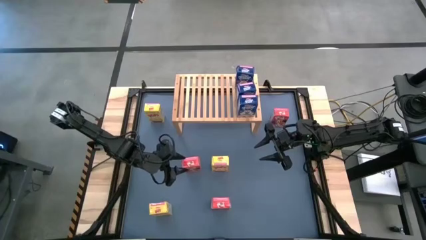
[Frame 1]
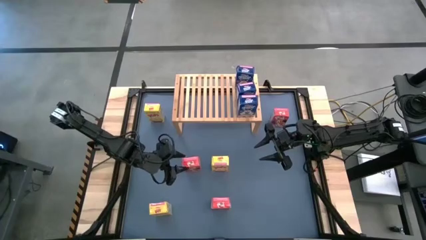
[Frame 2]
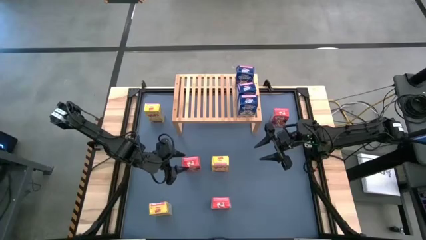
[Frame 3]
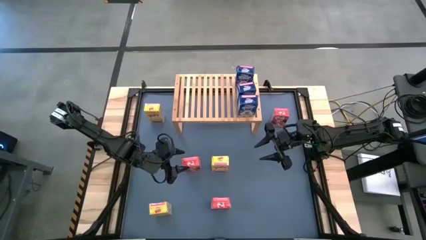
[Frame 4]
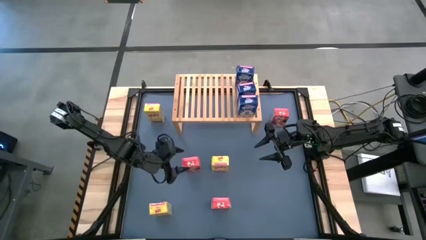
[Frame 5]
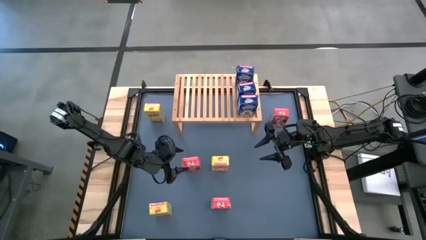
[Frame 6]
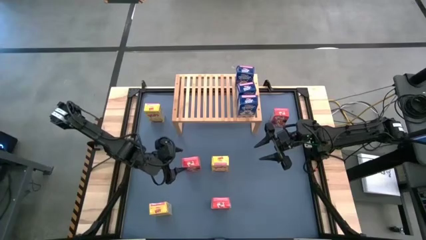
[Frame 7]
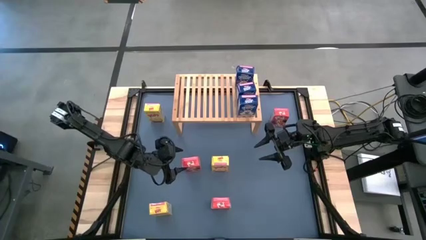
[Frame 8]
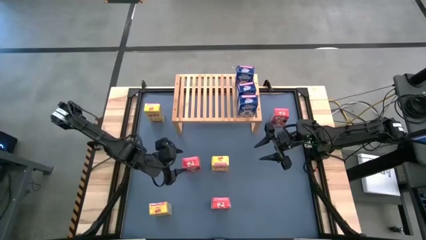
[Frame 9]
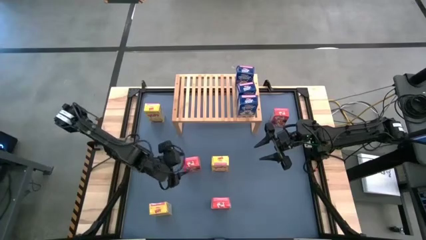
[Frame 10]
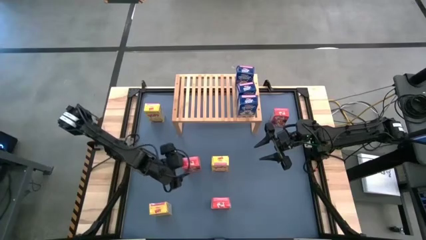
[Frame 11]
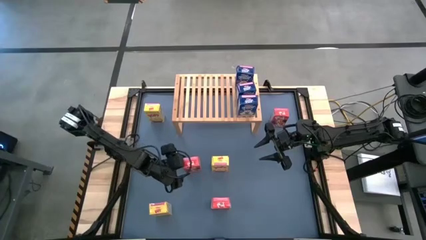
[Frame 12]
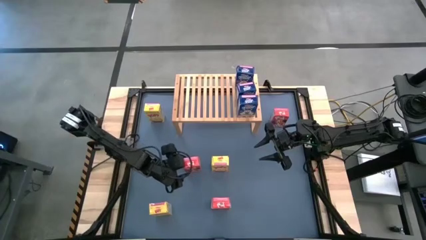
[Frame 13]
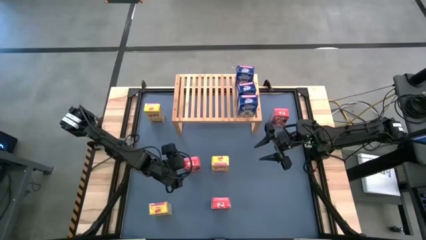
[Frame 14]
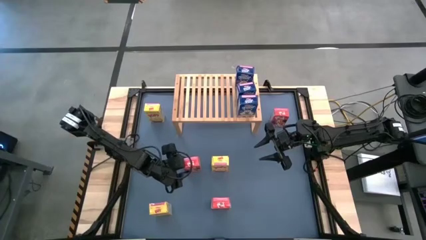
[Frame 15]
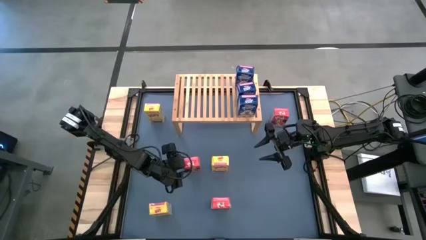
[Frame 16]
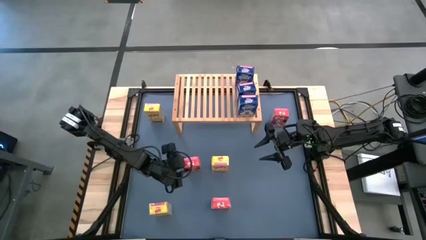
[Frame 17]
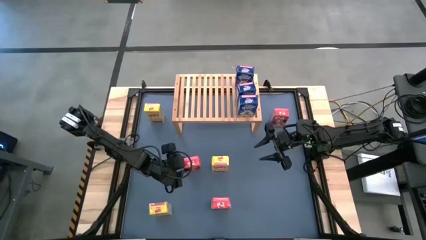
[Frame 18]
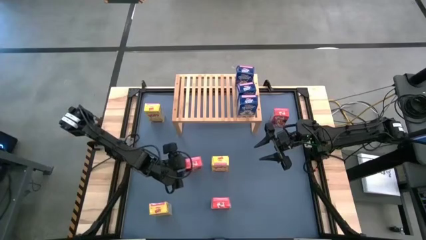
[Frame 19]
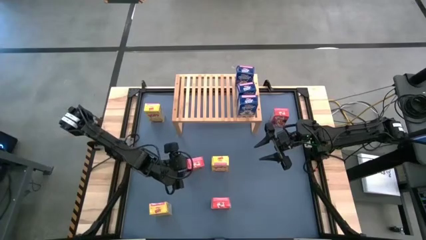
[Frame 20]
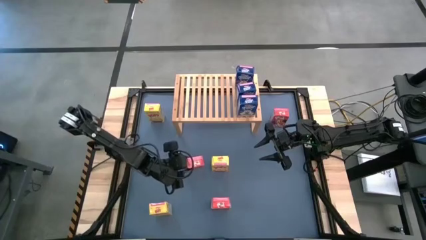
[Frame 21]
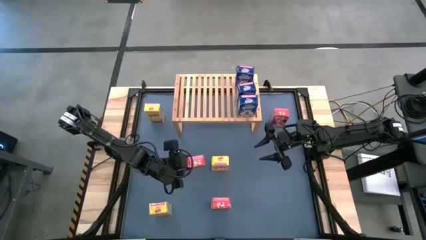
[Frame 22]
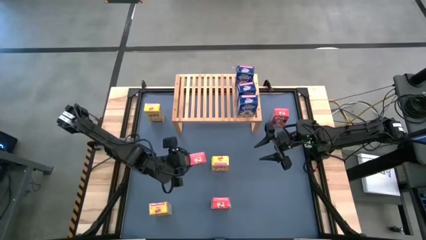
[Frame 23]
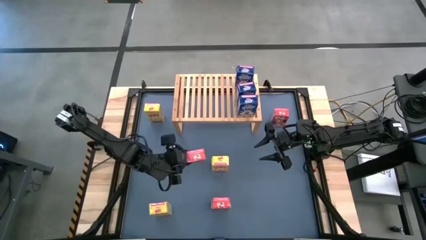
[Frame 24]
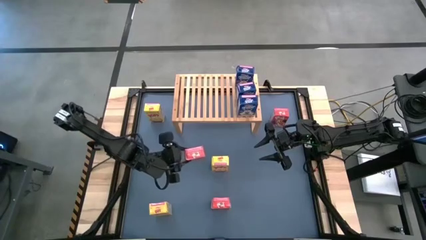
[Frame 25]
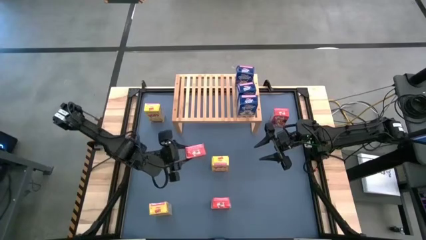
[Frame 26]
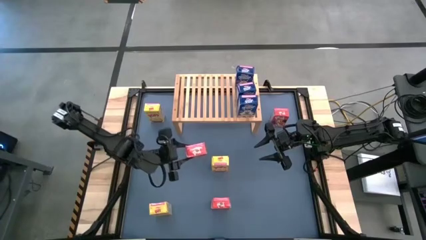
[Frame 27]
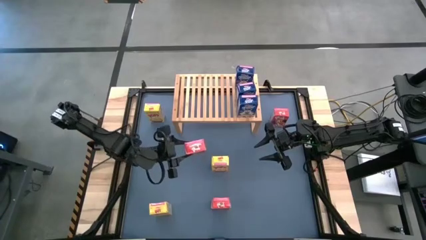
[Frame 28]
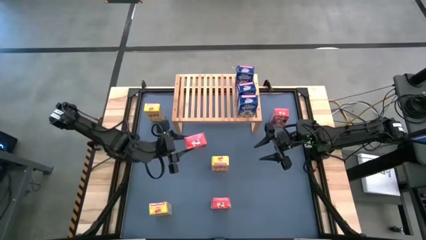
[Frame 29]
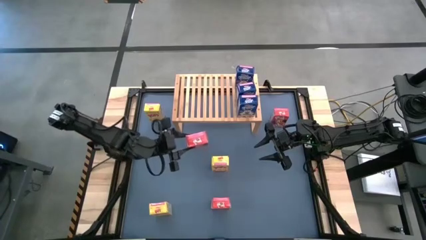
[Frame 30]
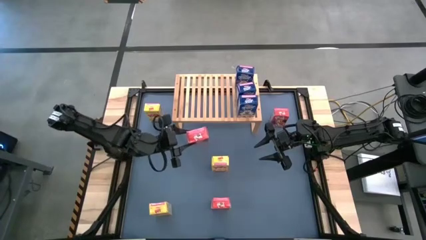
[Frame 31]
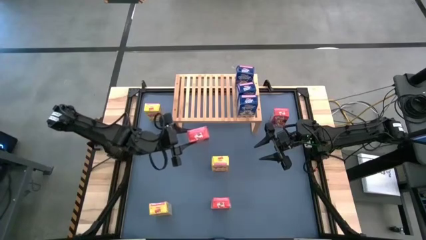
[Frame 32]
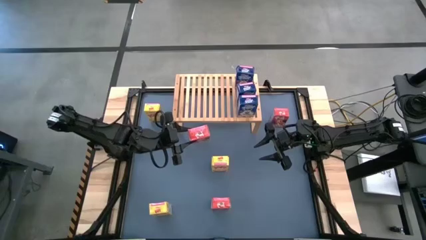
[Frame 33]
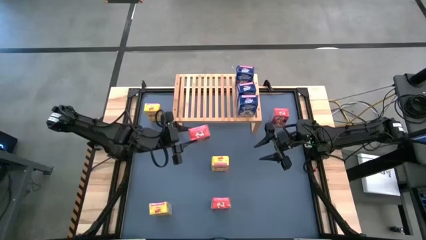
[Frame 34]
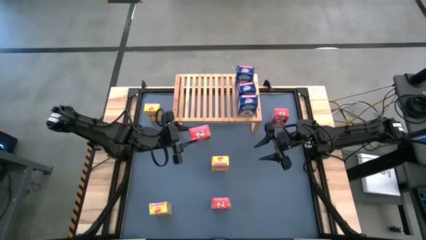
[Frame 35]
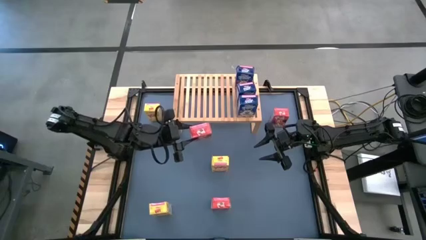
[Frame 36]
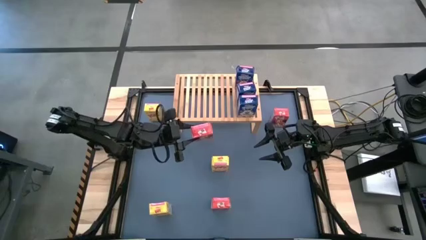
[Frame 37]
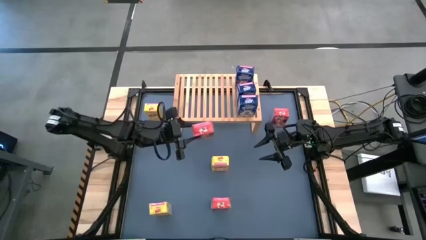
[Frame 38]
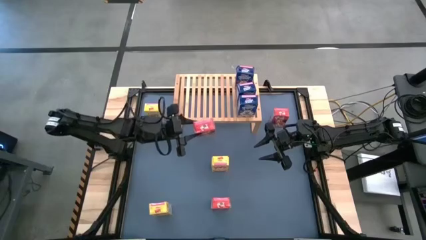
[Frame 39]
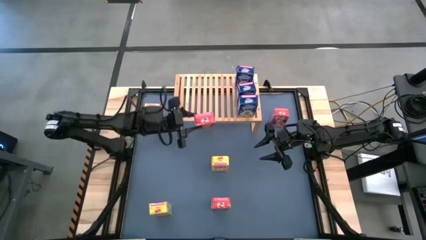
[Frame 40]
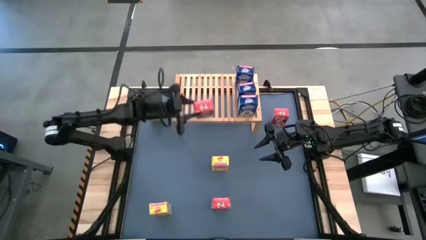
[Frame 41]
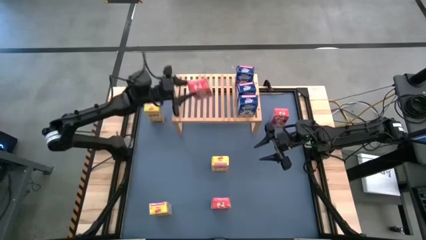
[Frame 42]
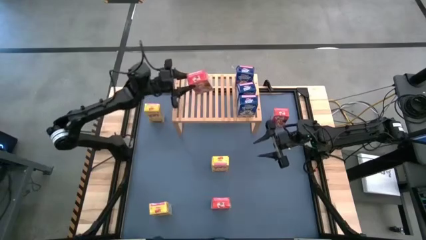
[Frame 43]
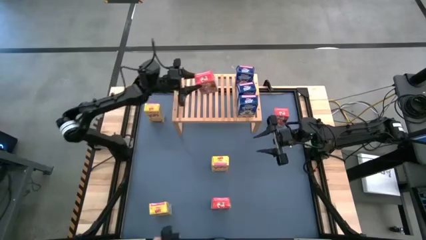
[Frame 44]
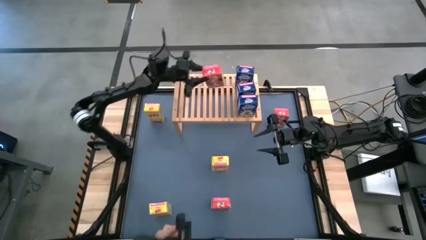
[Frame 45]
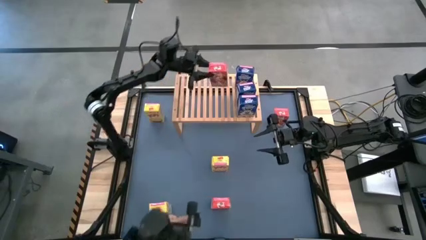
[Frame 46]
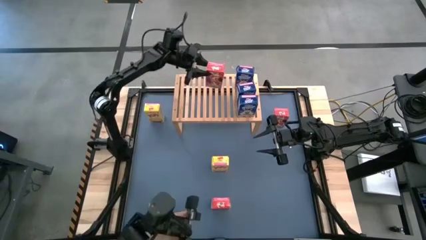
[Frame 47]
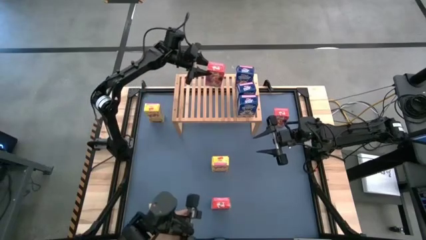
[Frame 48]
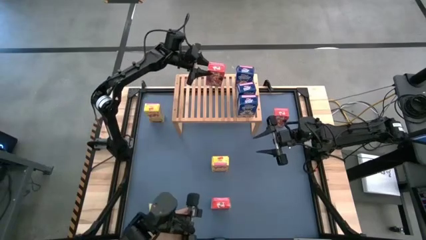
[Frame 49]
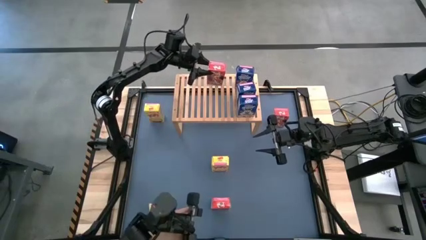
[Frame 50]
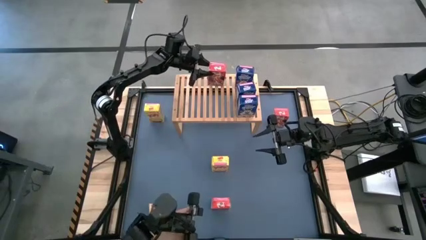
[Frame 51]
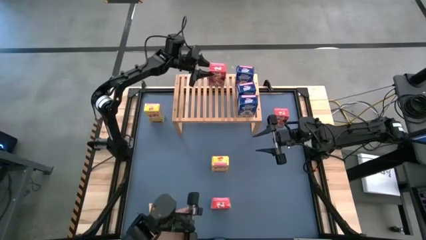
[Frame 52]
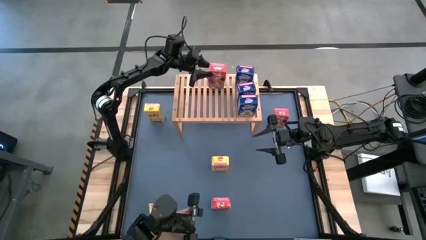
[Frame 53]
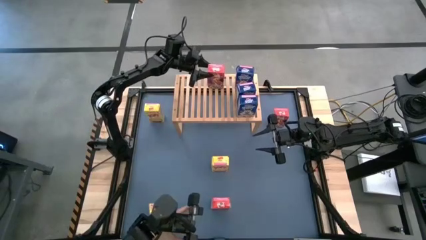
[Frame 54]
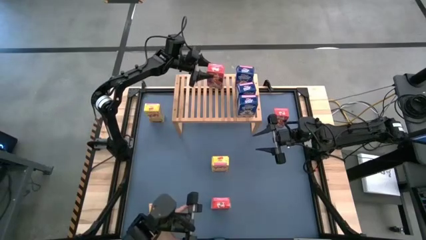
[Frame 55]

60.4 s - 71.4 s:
Task: Stack cereal on shelf
Put the middle red cereal box on the shelf
